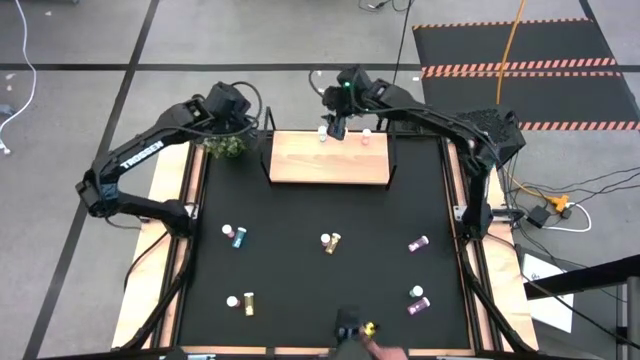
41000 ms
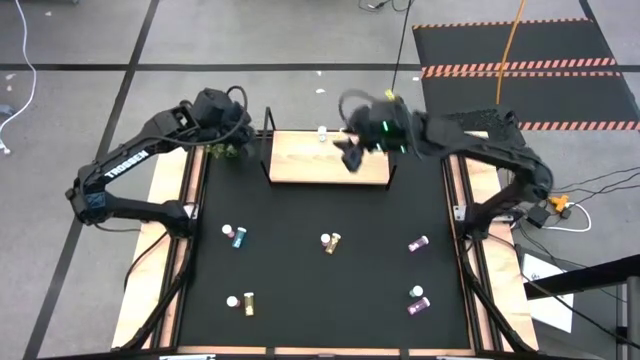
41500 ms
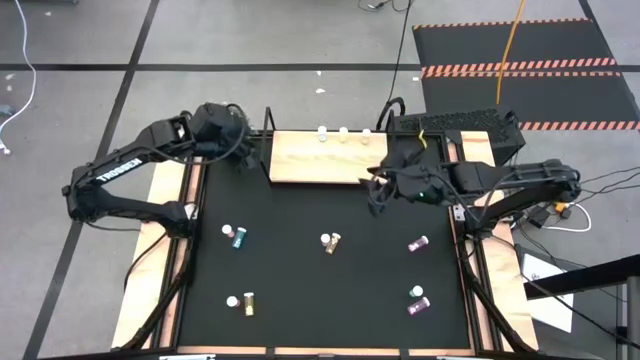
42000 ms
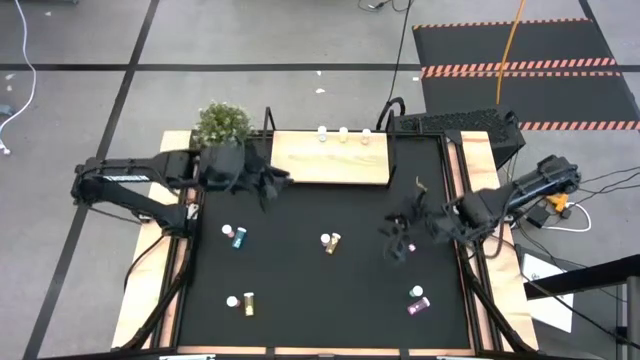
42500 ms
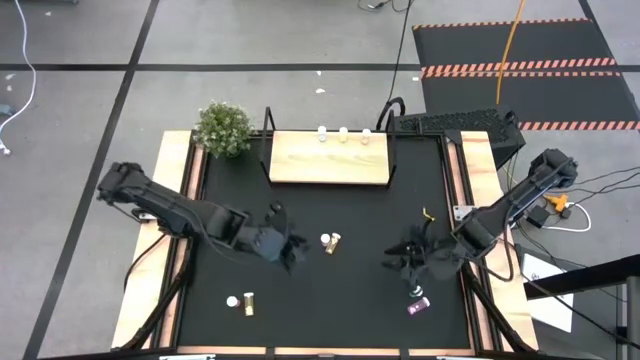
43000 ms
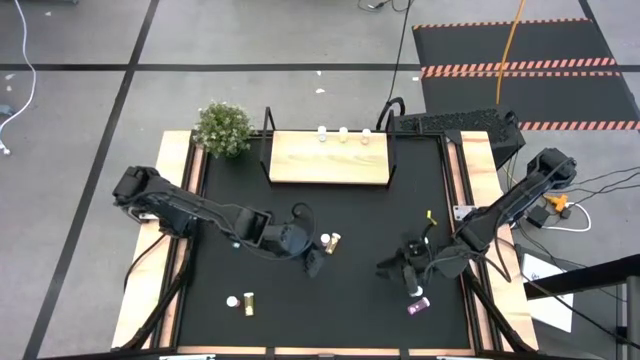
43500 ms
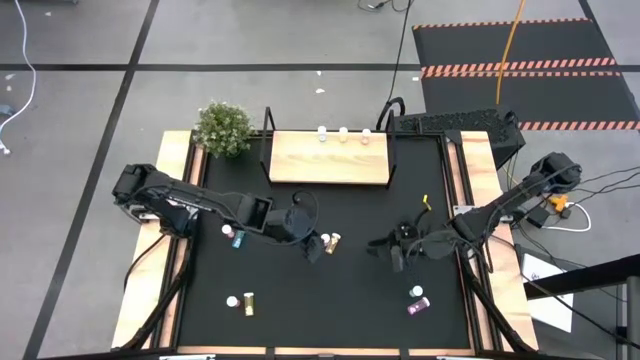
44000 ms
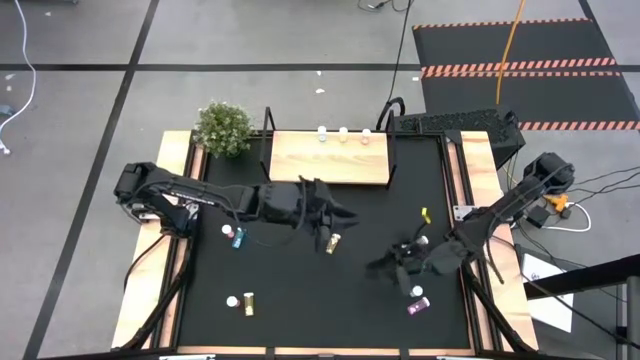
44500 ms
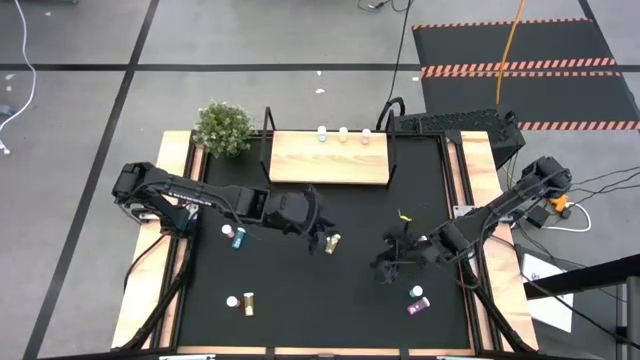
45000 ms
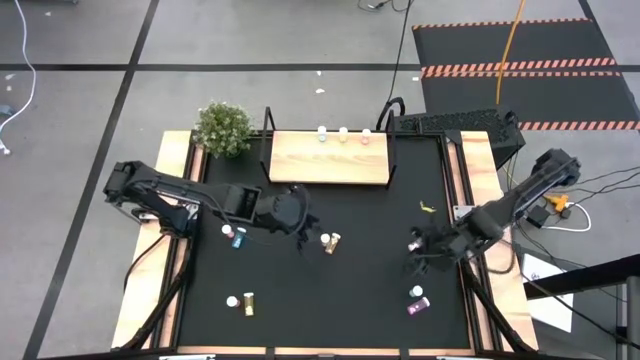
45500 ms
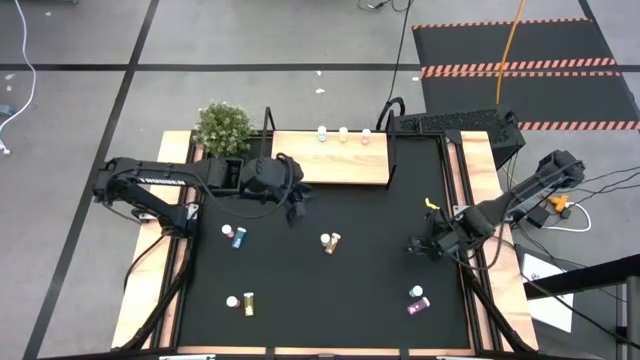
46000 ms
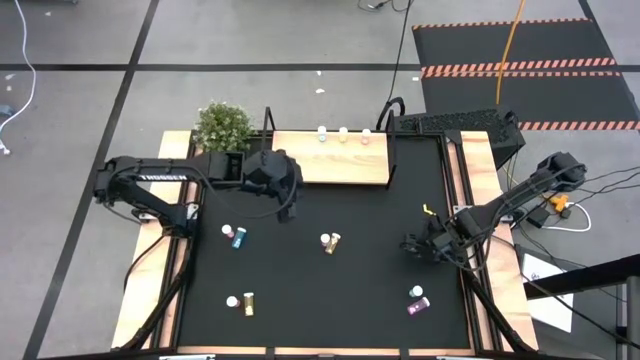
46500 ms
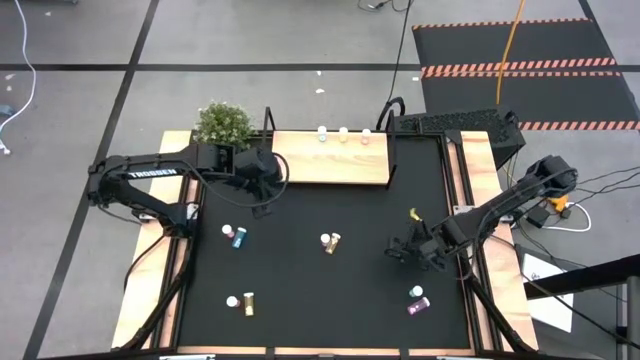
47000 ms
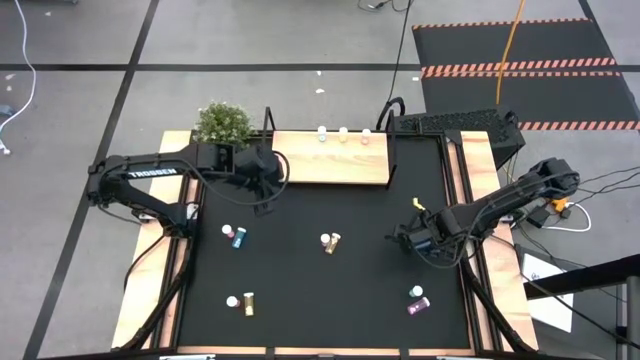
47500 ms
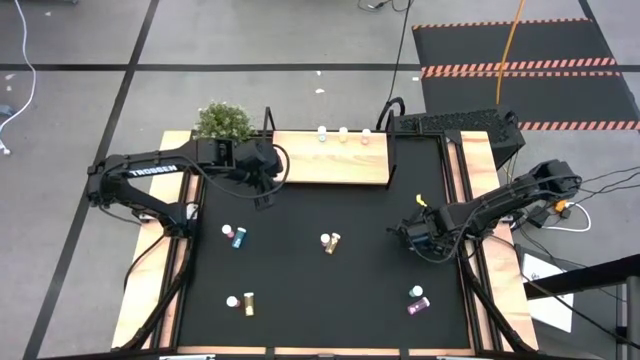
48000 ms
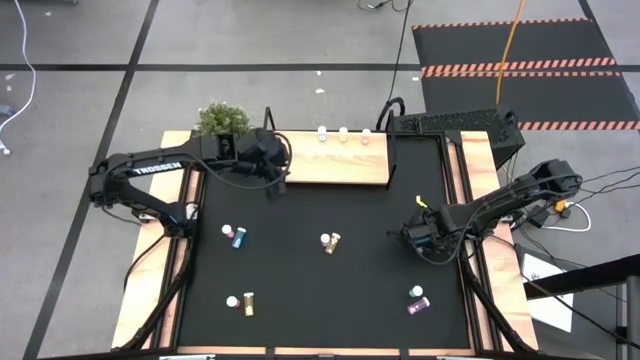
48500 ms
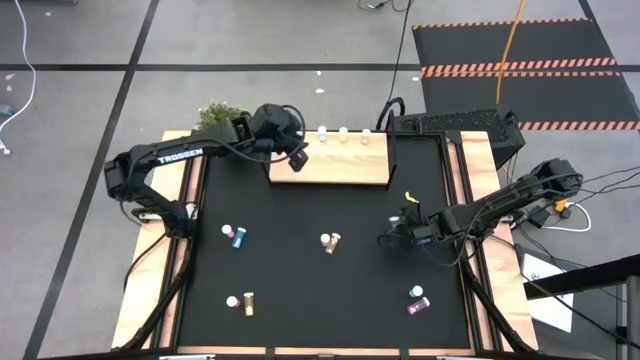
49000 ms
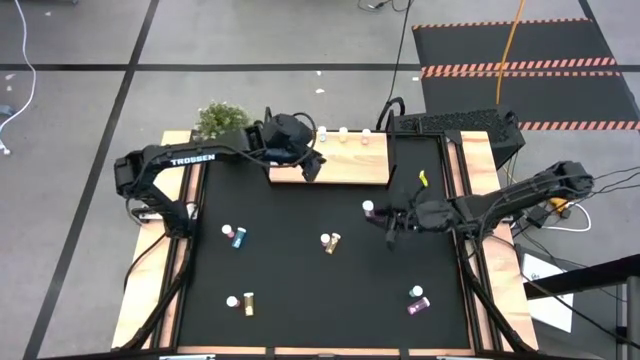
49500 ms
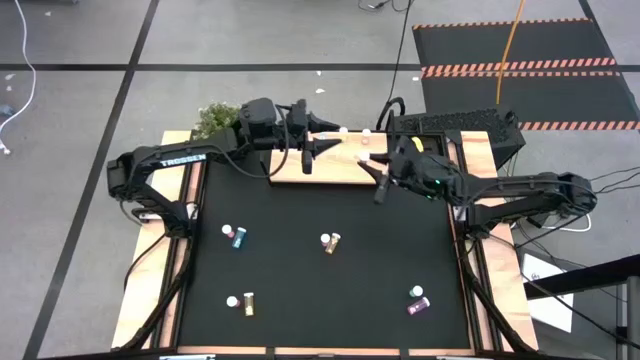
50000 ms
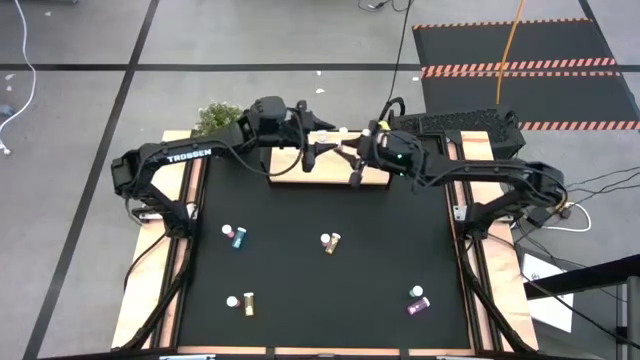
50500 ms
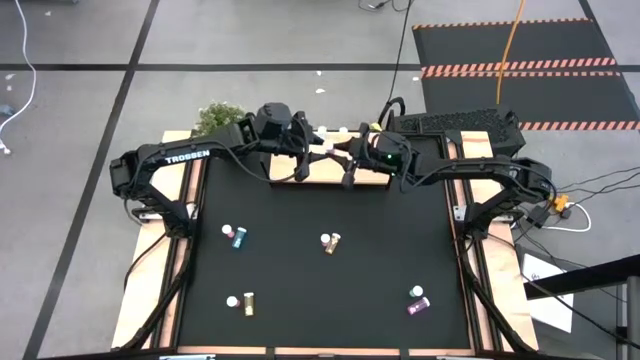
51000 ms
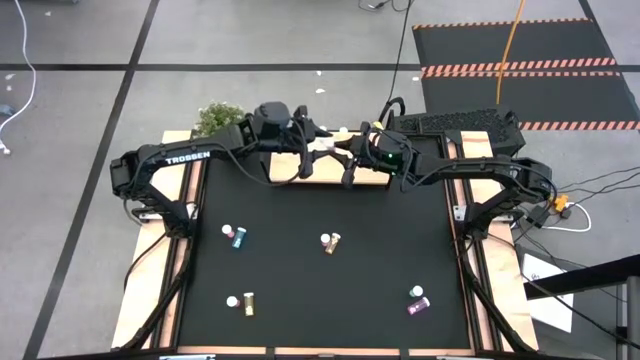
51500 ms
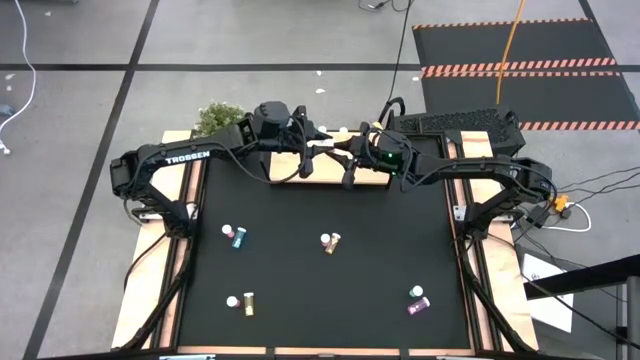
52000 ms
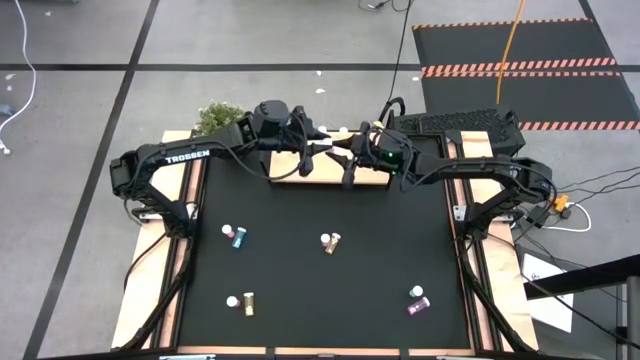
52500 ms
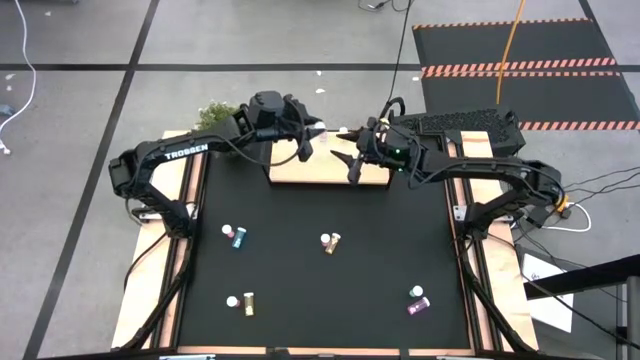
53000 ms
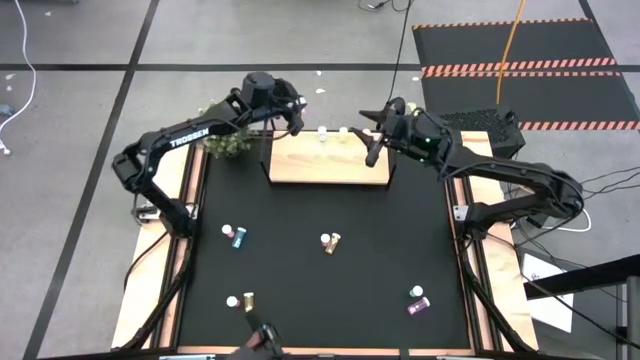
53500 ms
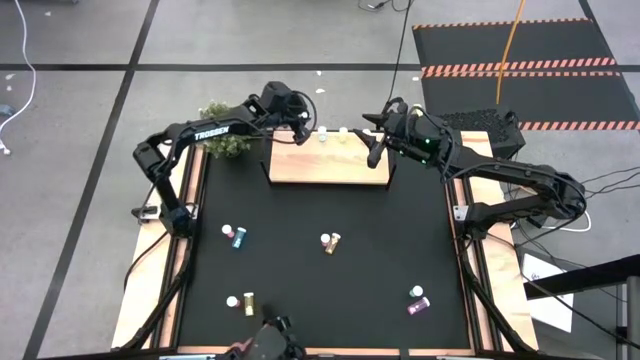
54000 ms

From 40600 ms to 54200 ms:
Task: Pick and place medicine bottles onto shelf by color
Put the top right purple pill bottle on the shelf

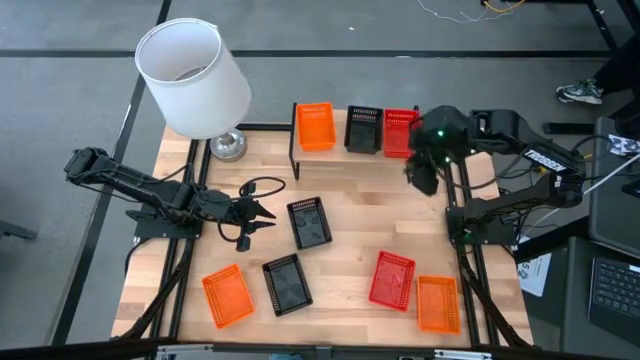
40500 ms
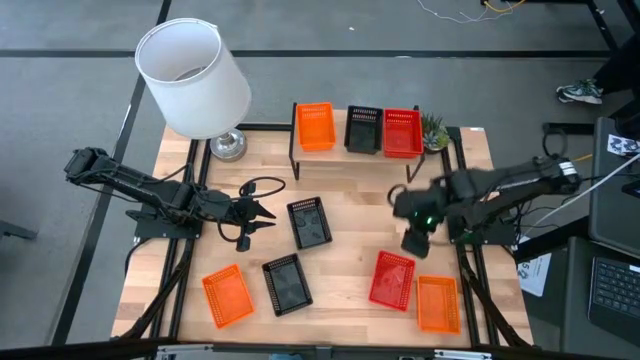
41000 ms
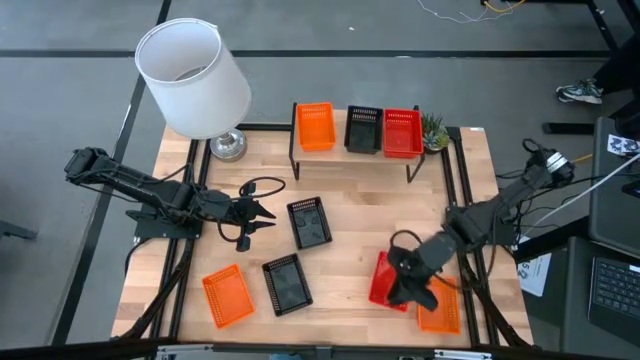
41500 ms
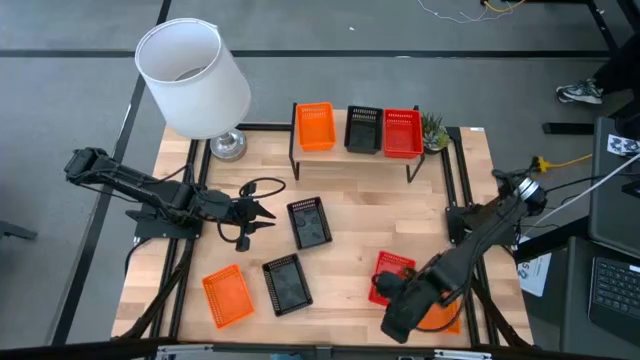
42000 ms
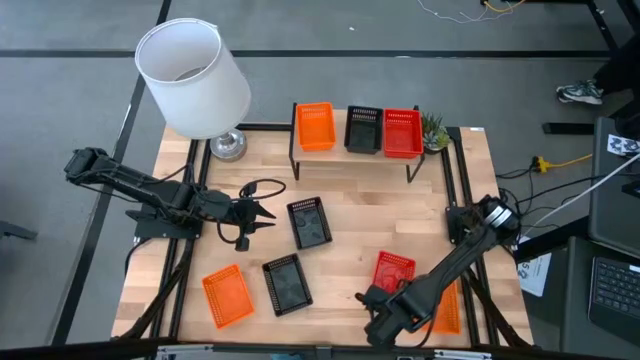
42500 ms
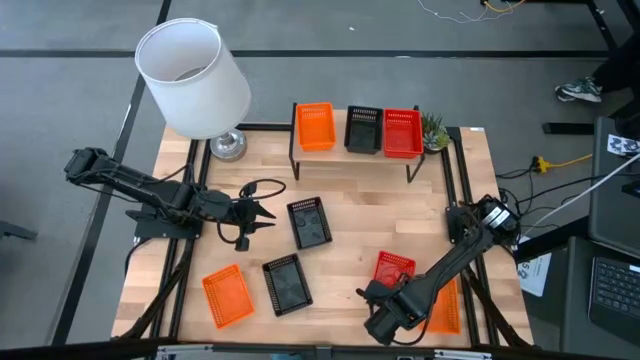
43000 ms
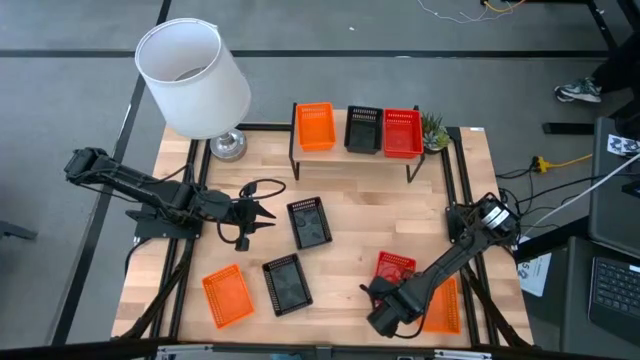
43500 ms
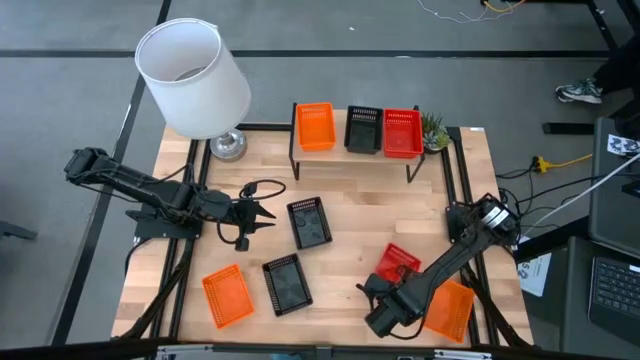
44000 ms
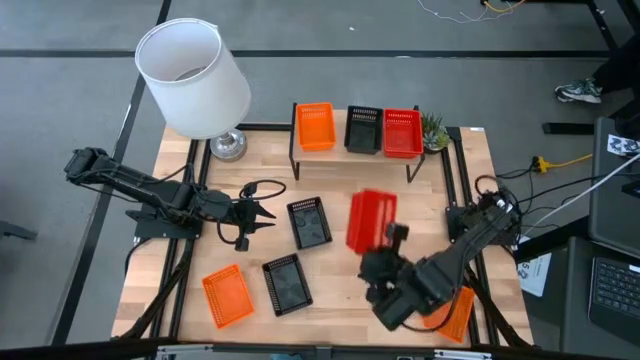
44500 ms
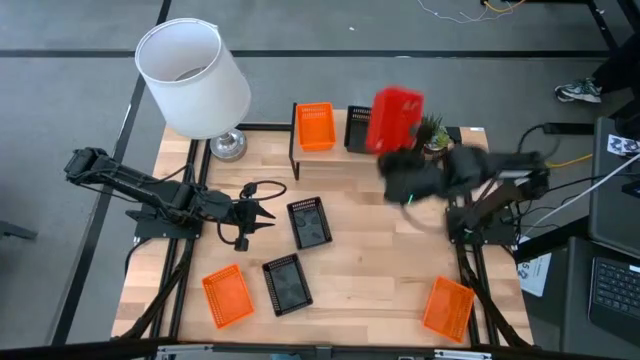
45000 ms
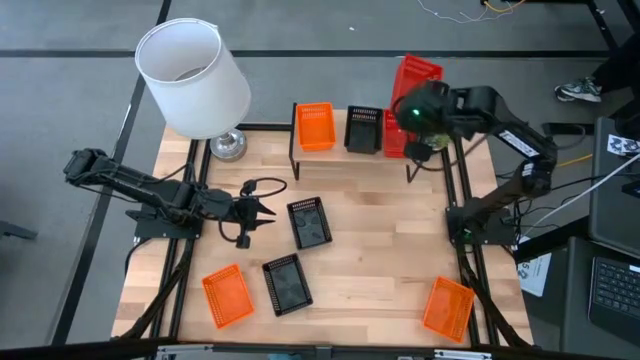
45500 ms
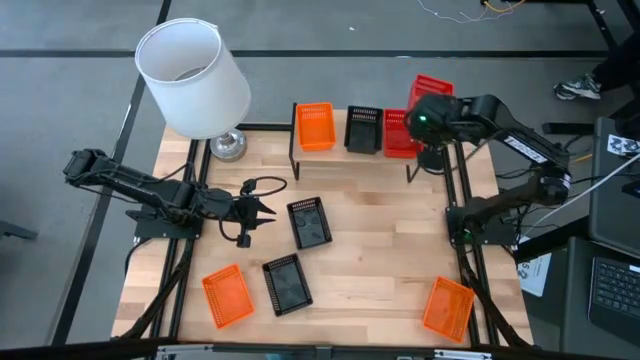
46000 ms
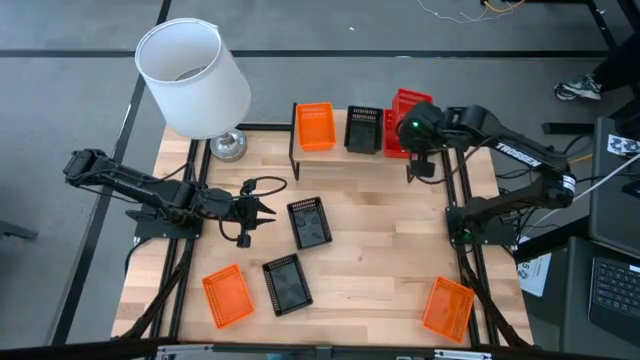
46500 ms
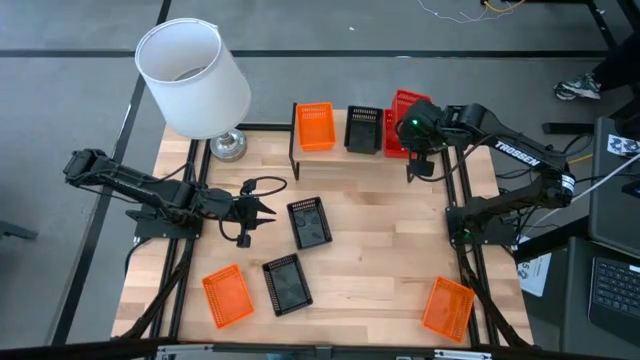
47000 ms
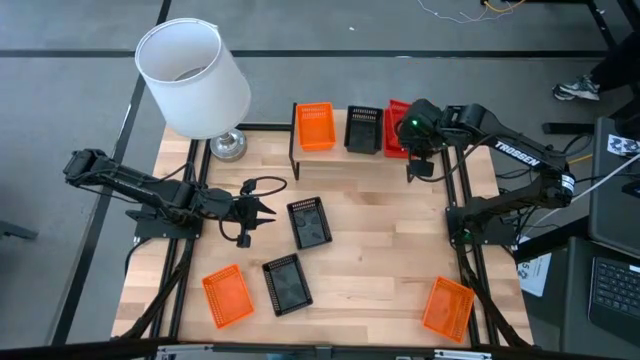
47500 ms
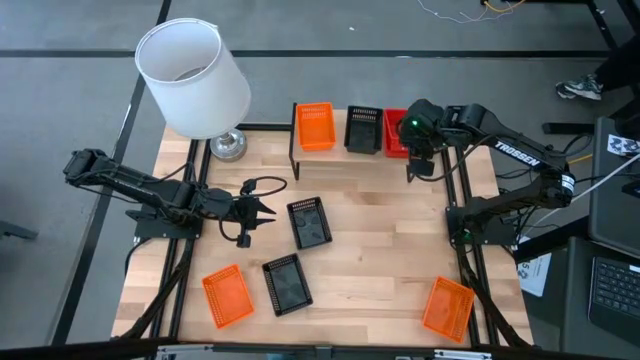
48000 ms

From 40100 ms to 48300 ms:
Task: Stack baskets on shelf by color
Stack the red basket on the other red basket on the shelf
